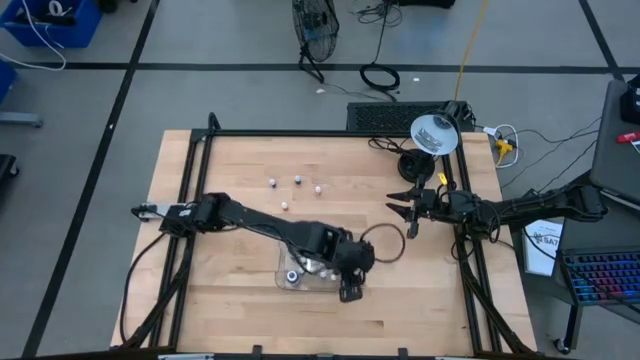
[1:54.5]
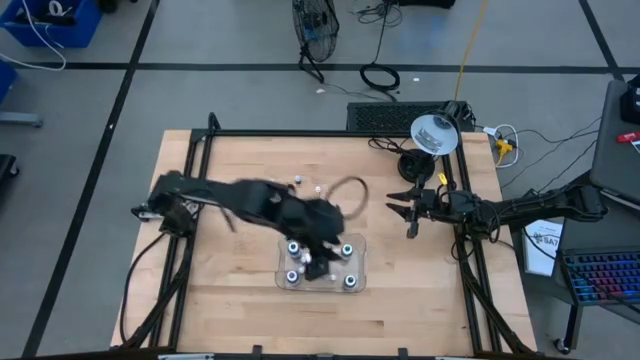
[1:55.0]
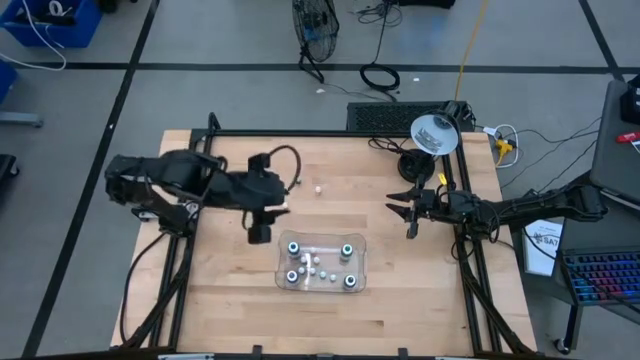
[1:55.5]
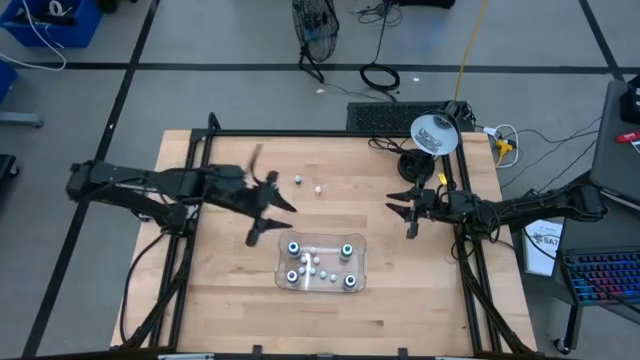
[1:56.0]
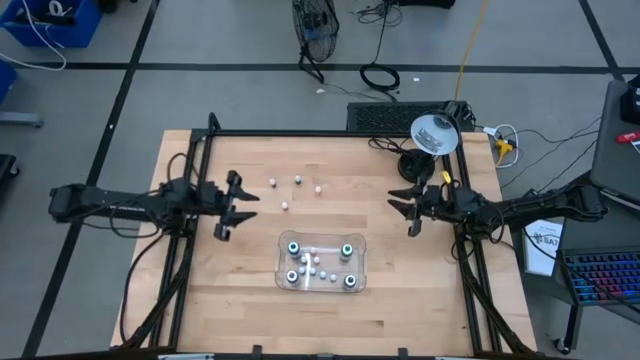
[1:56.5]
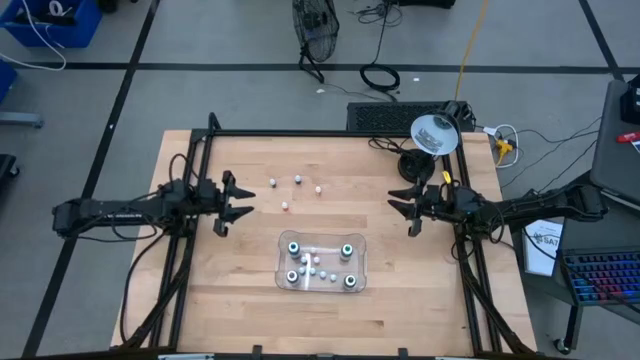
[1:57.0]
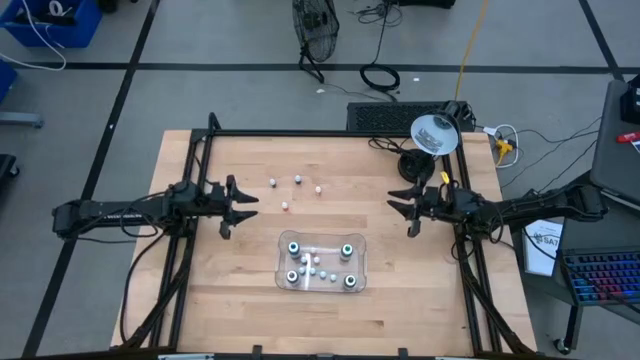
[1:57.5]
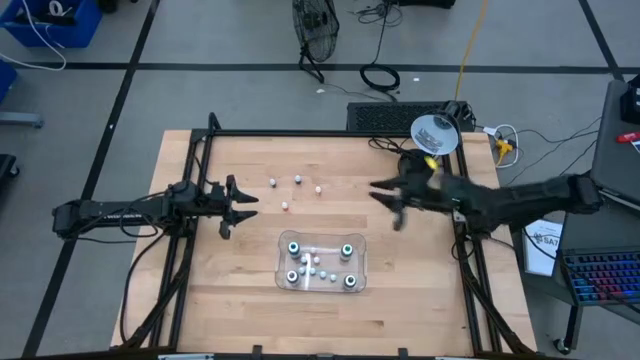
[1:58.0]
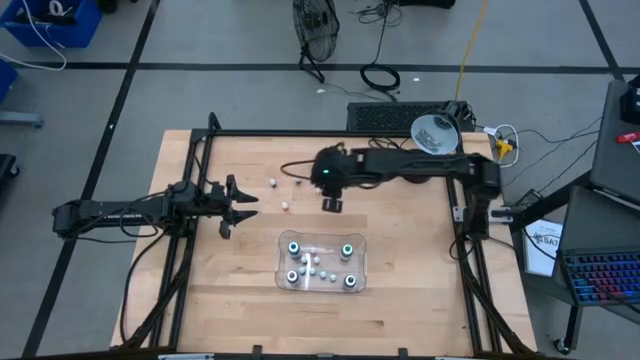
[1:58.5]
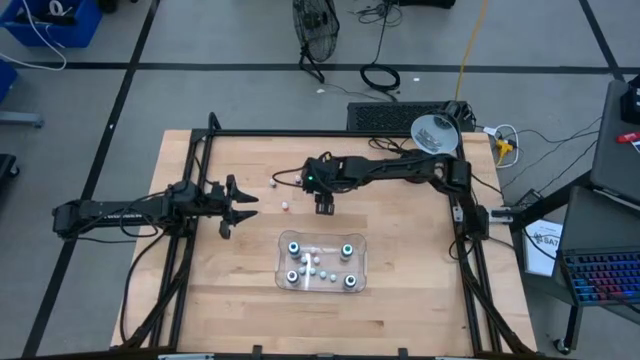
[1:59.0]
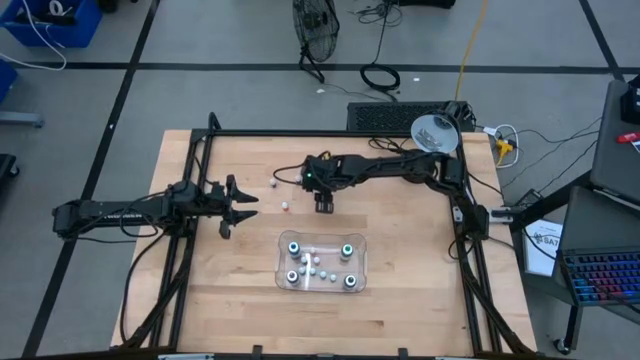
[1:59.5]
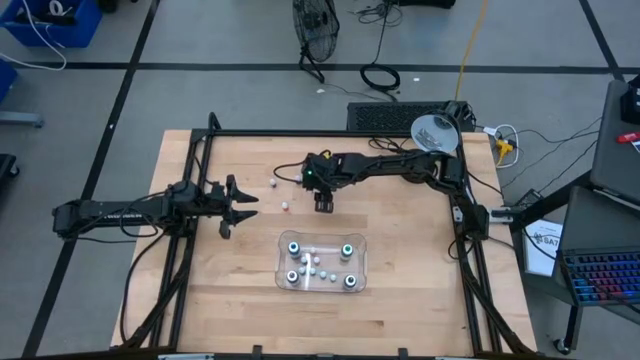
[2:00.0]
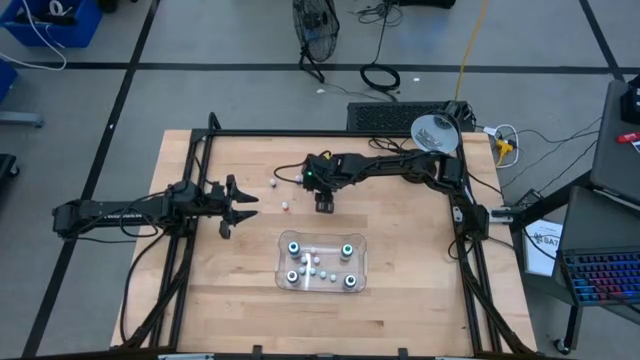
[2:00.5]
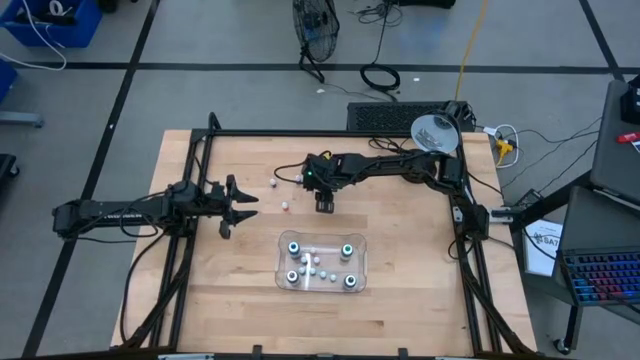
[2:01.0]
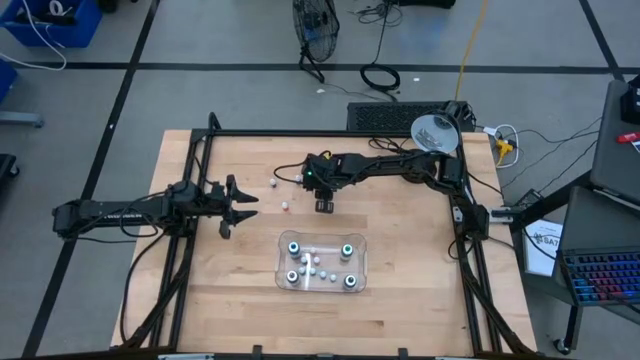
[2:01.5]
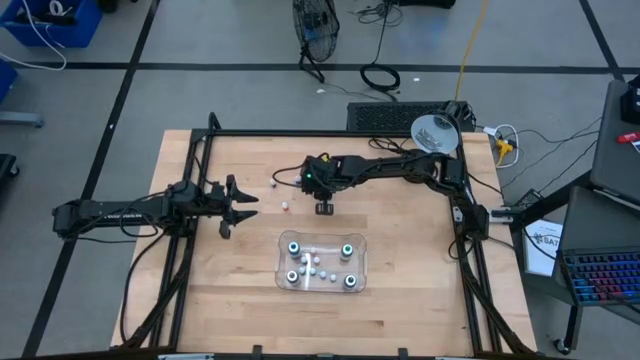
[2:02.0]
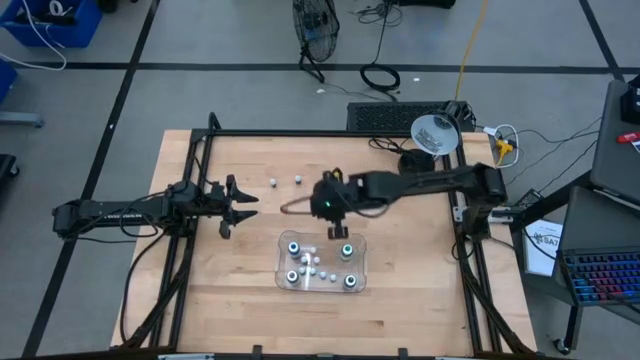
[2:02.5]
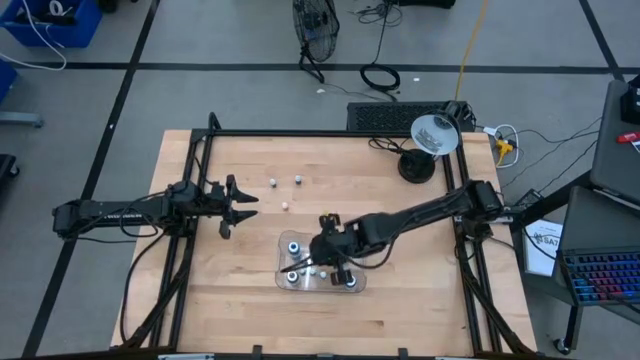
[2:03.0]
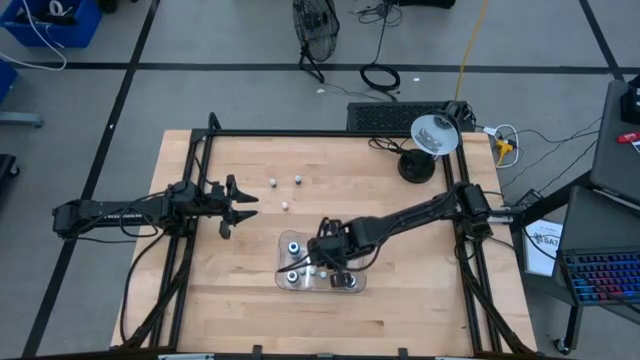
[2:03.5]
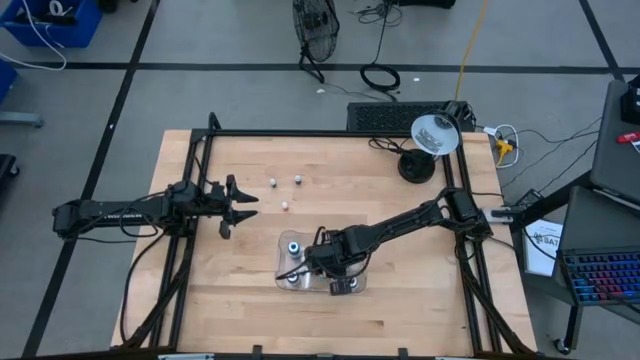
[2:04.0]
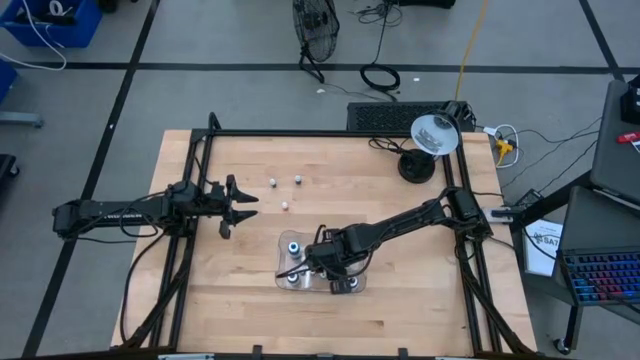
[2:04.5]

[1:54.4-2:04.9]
Task: Pick & Place food coloring
Put the top small orange food coloring bottle into the bin

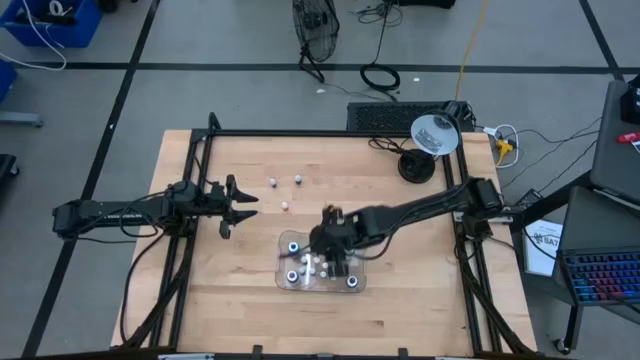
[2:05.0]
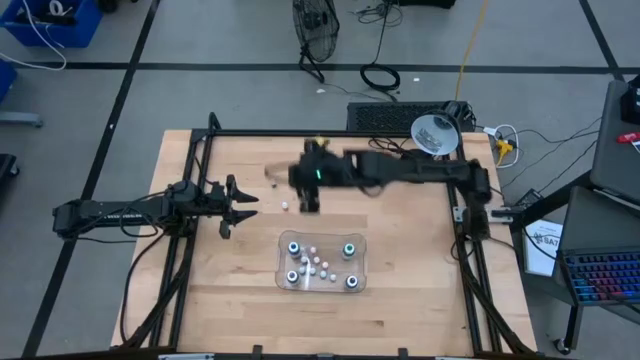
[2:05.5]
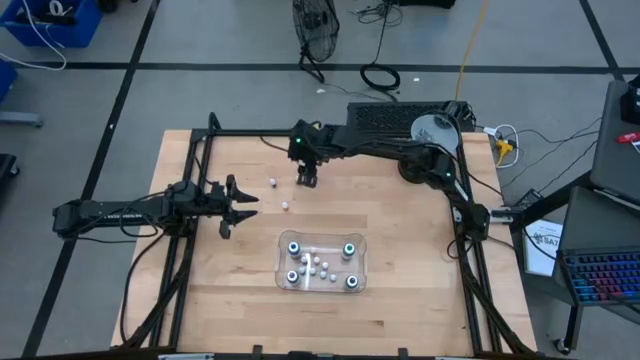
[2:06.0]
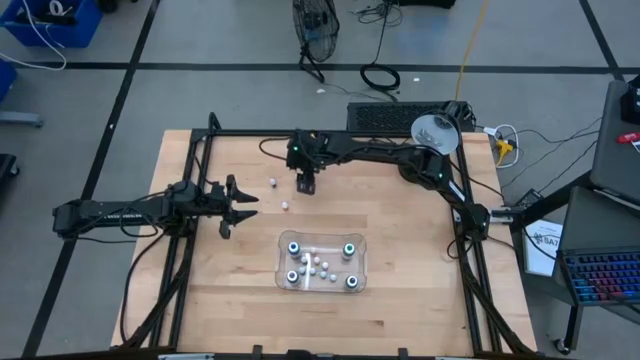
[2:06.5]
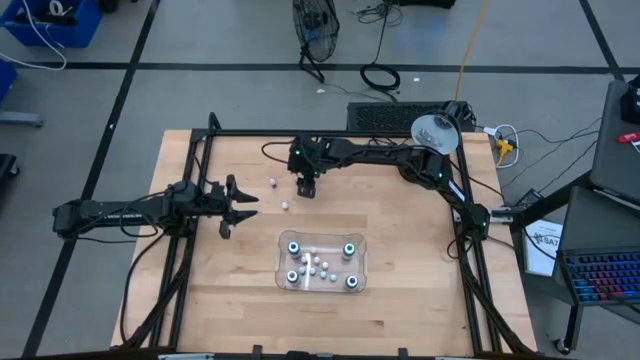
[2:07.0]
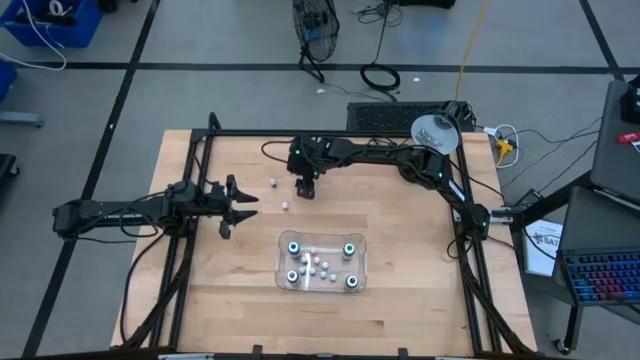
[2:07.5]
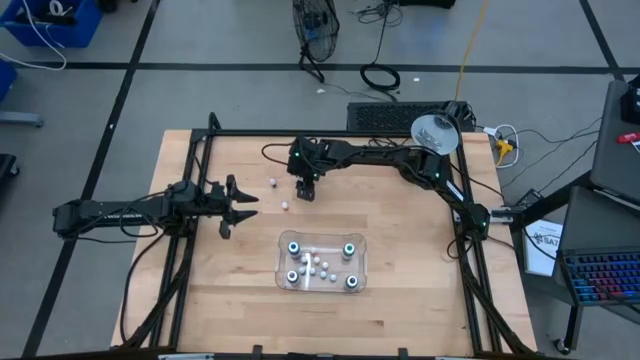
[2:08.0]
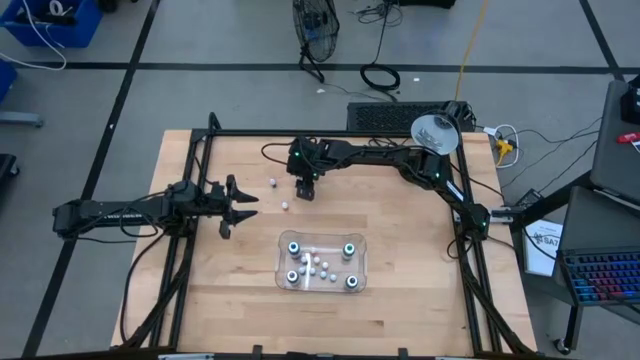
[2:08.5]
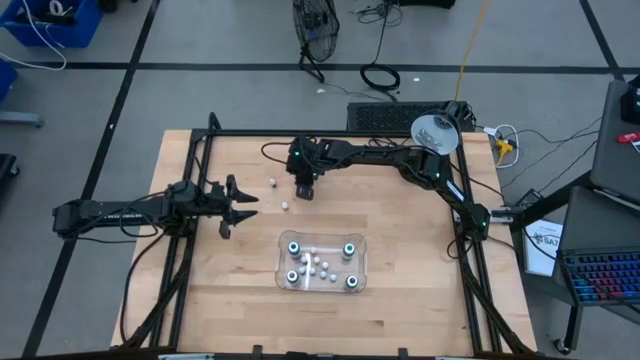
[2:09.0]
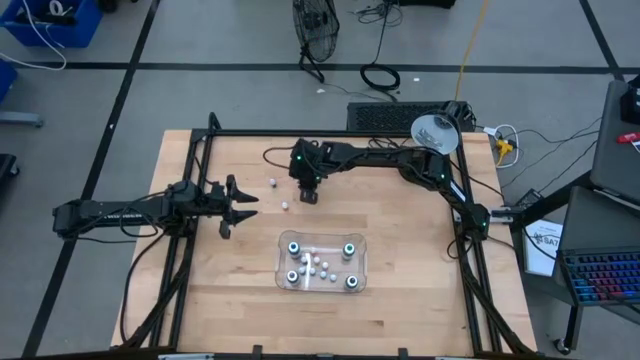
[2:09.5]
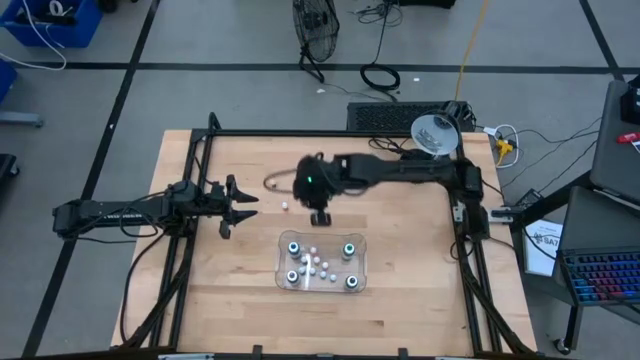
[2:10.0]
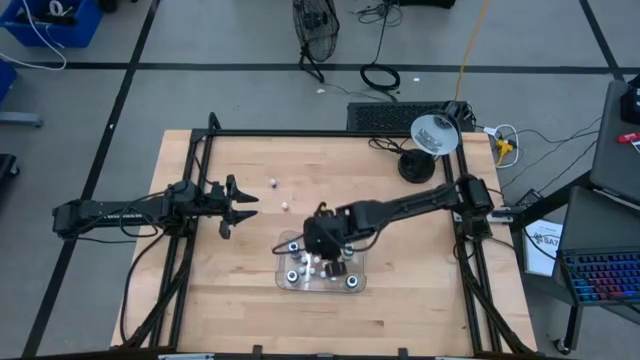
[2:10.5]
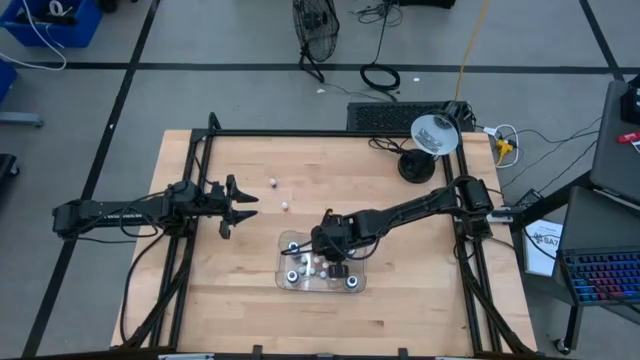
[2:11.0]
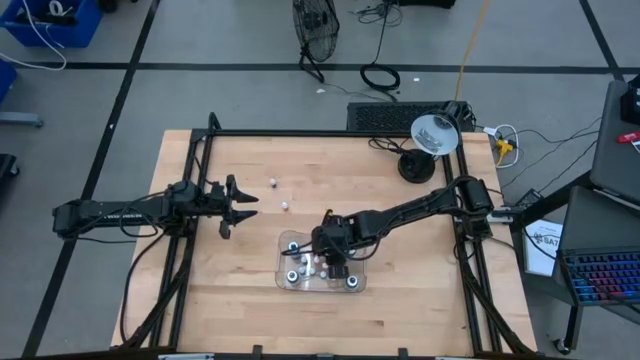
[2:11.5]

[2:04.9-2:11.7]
Put the small black food coloring bottle into the bin

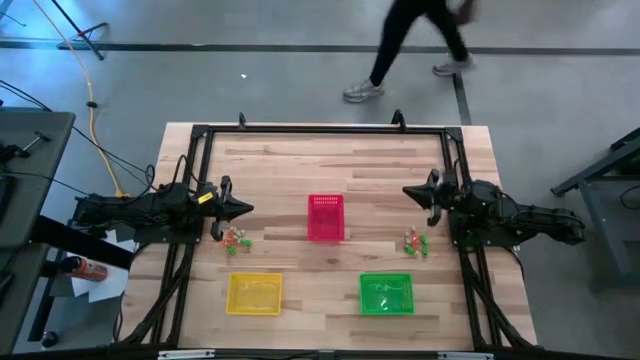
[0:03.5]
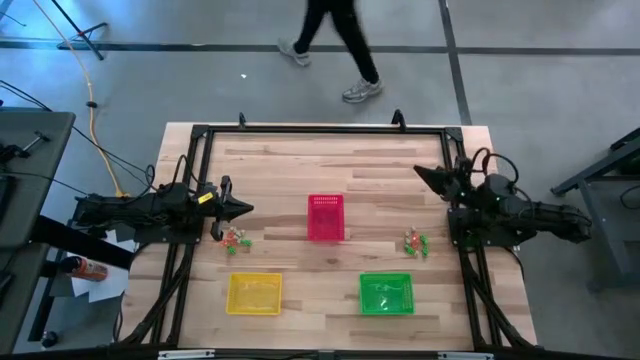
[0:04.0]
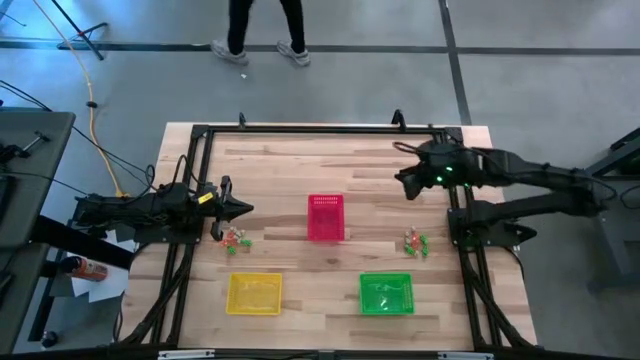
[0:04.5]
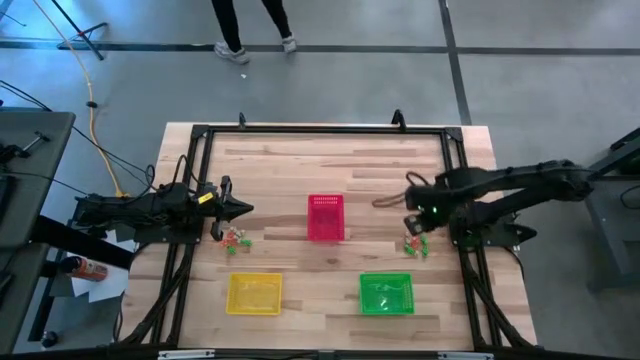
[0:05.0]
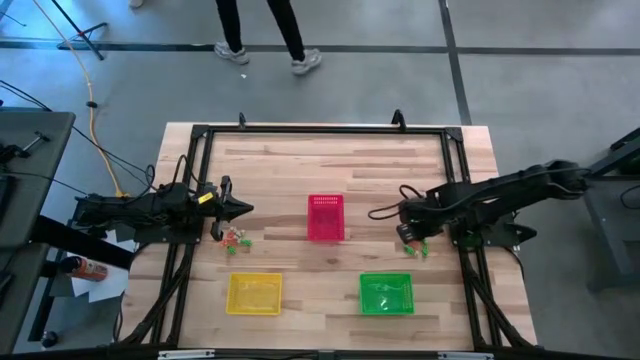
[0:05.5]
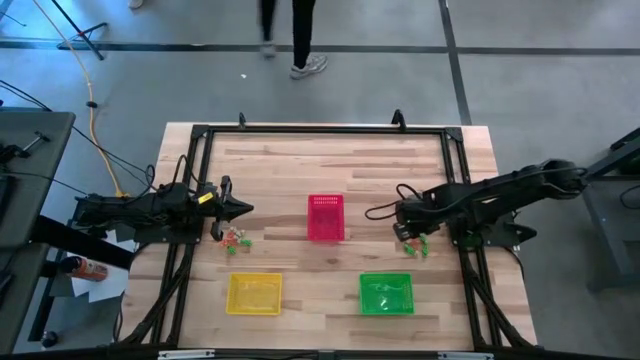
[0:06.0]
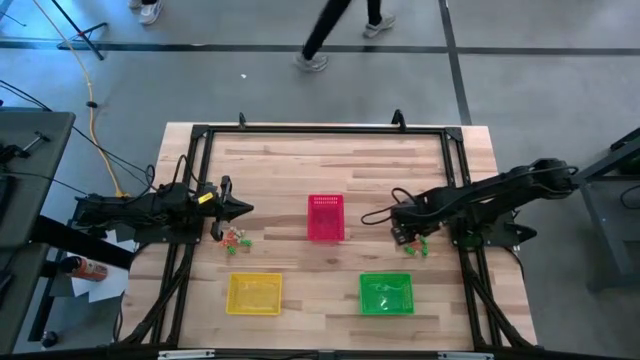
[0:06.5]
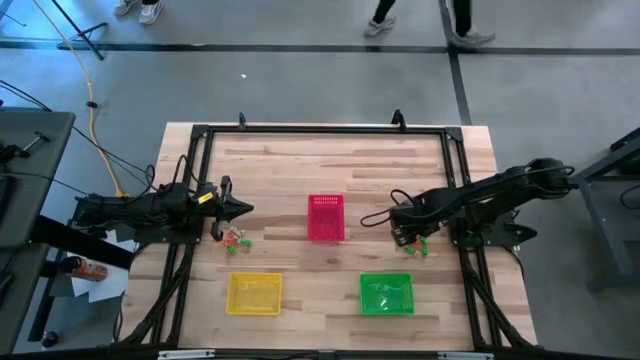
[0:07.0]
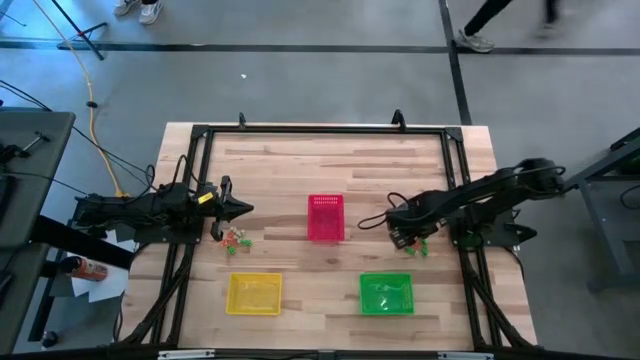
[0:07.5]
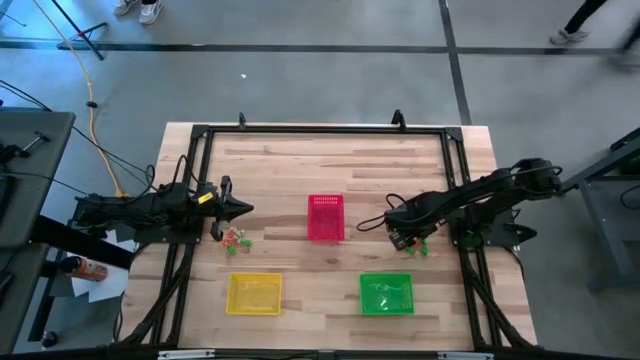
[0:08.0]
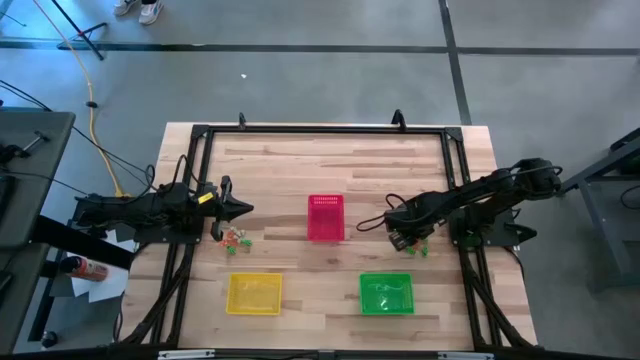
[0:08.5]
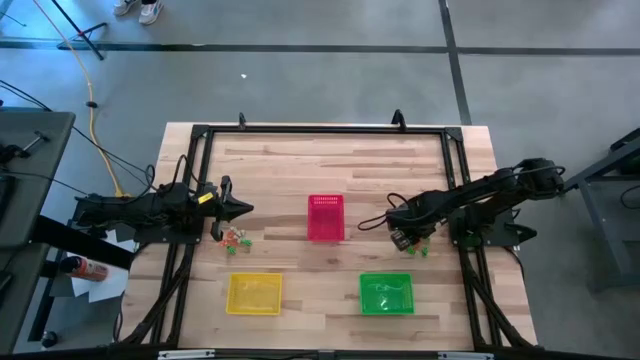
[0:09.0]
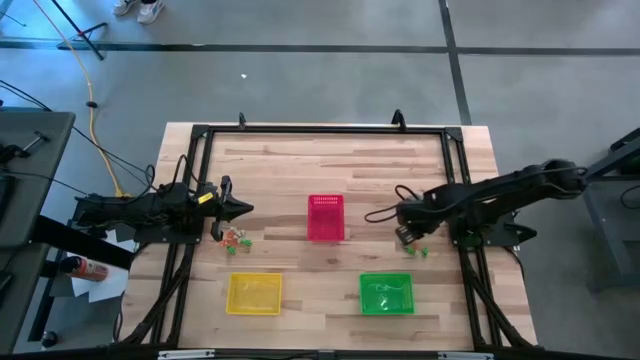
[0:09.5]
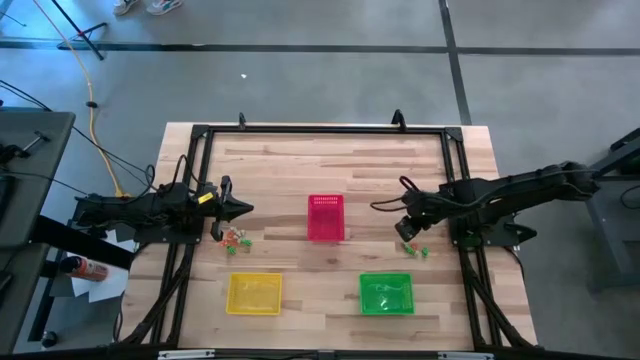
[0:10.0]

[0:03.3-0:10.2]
Task: Sort Halloween decoration
Put the orange pumpkin toy into the red bin
